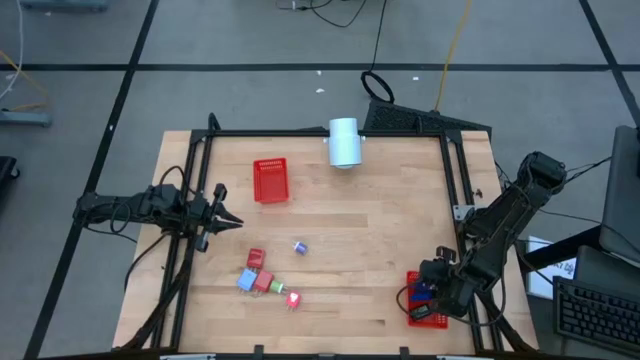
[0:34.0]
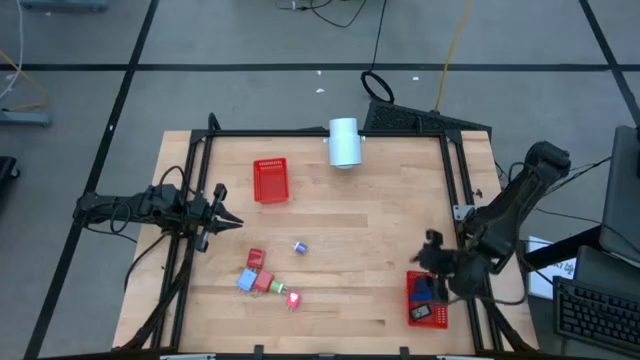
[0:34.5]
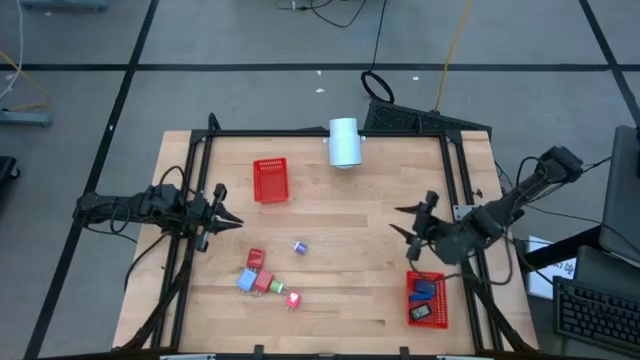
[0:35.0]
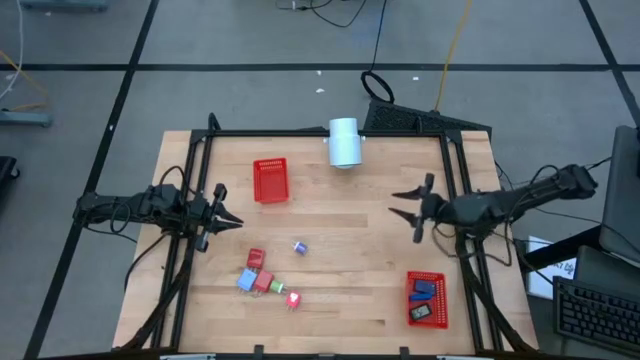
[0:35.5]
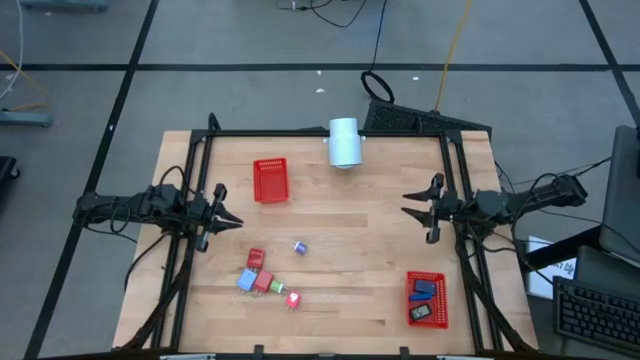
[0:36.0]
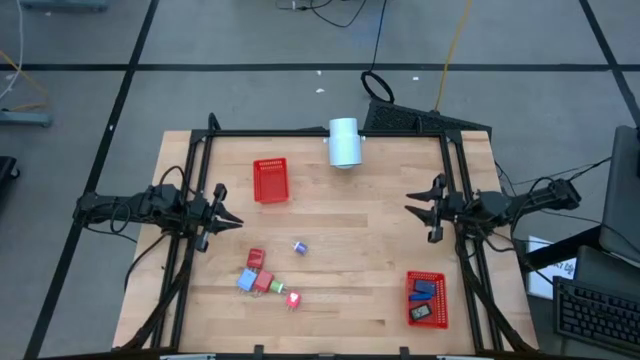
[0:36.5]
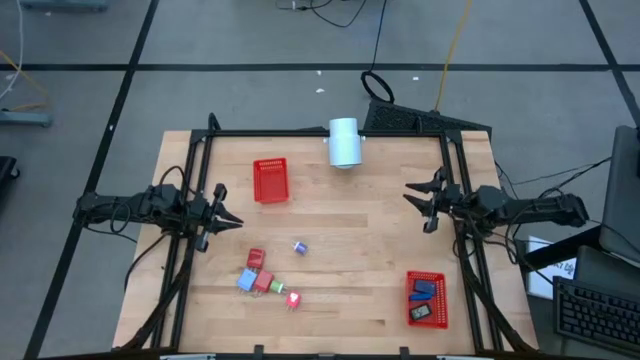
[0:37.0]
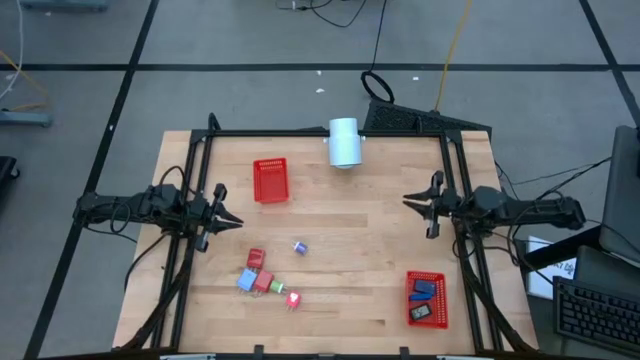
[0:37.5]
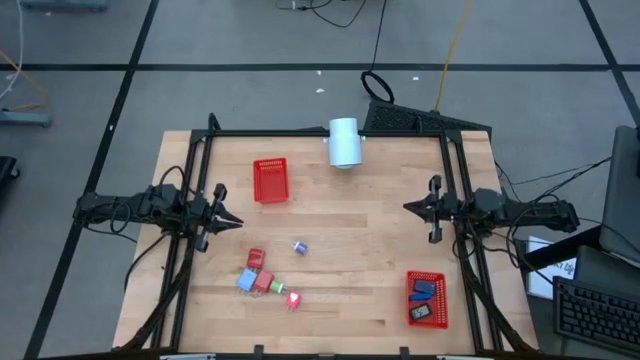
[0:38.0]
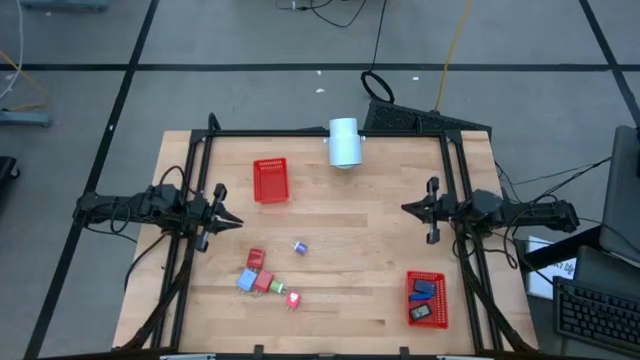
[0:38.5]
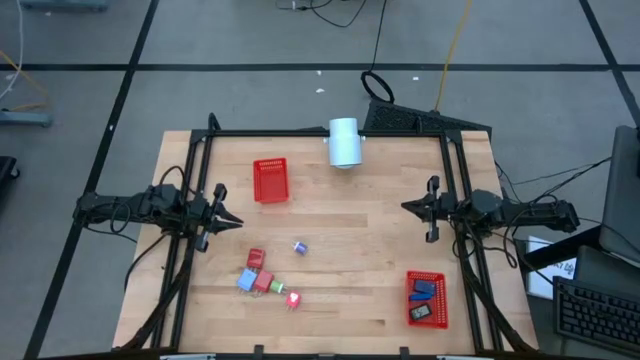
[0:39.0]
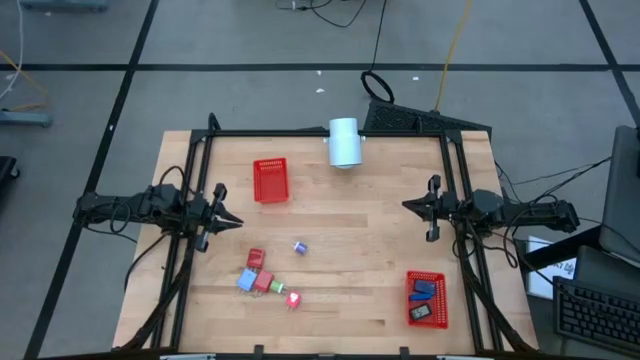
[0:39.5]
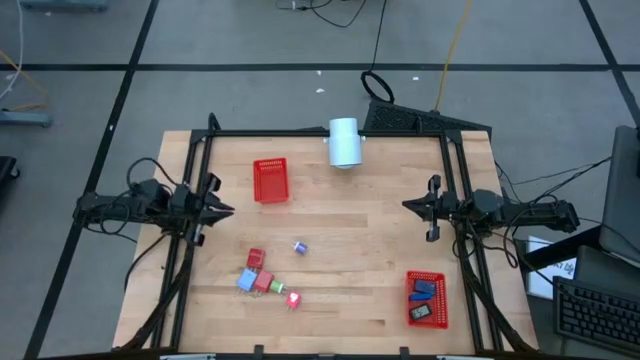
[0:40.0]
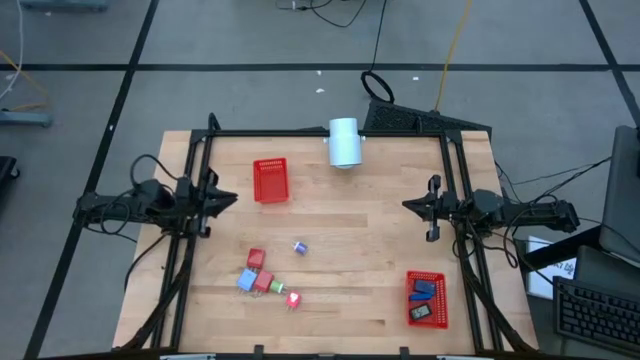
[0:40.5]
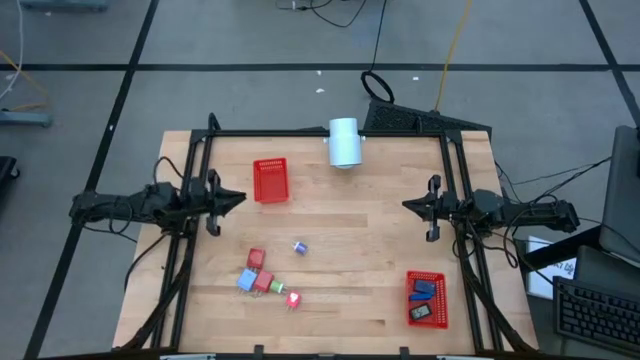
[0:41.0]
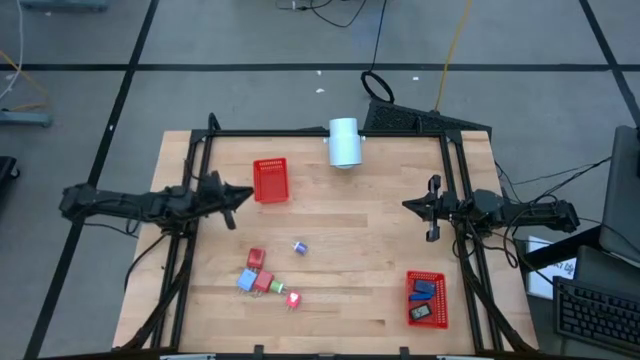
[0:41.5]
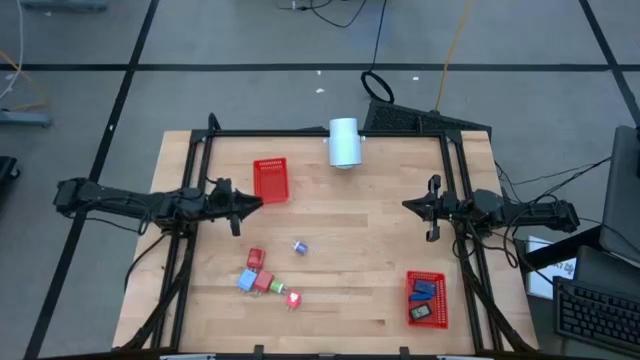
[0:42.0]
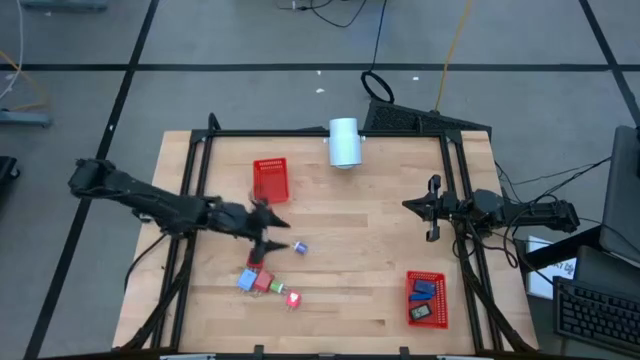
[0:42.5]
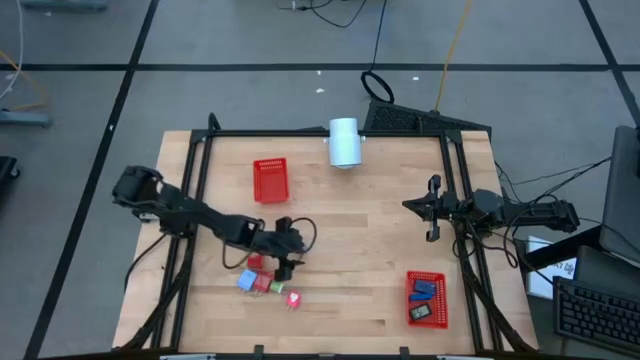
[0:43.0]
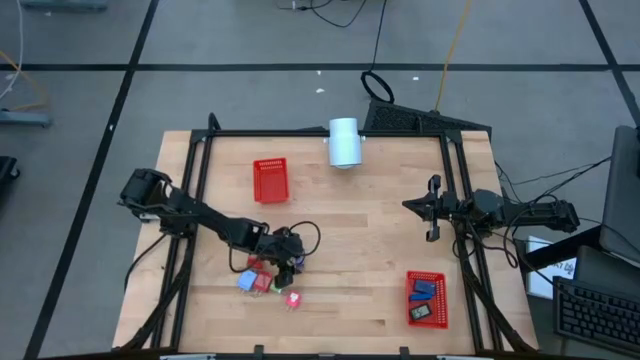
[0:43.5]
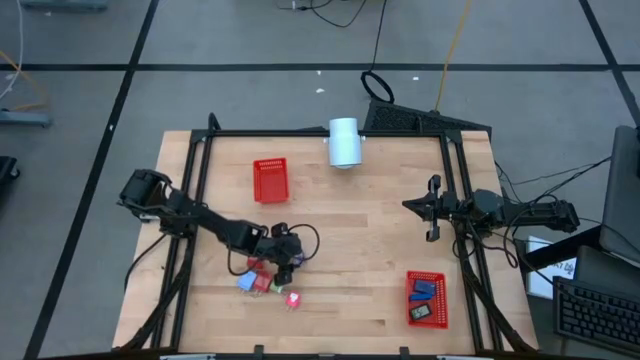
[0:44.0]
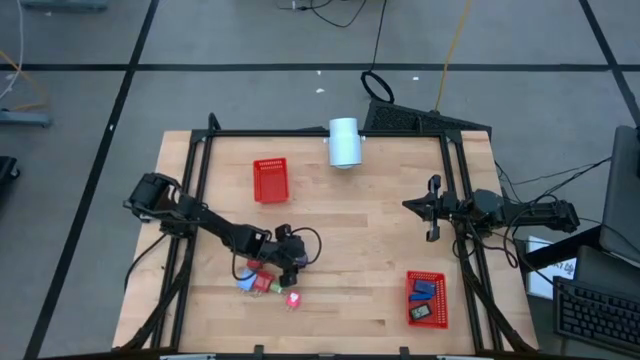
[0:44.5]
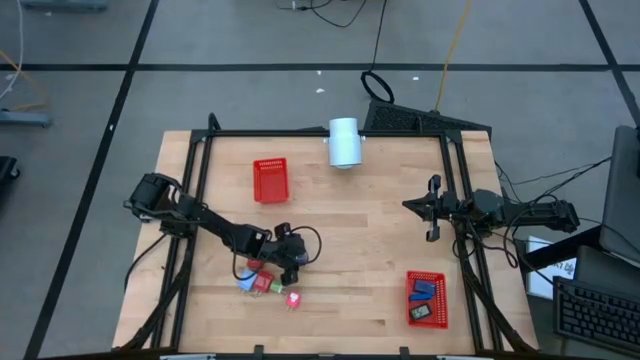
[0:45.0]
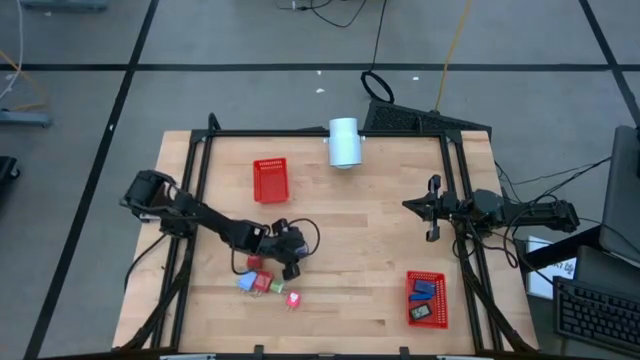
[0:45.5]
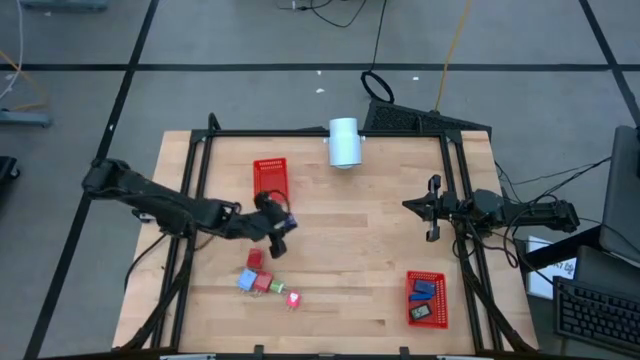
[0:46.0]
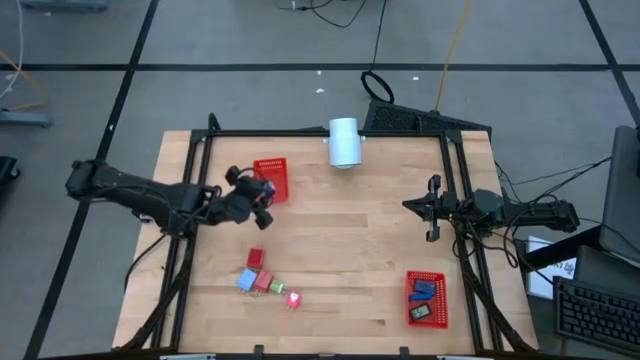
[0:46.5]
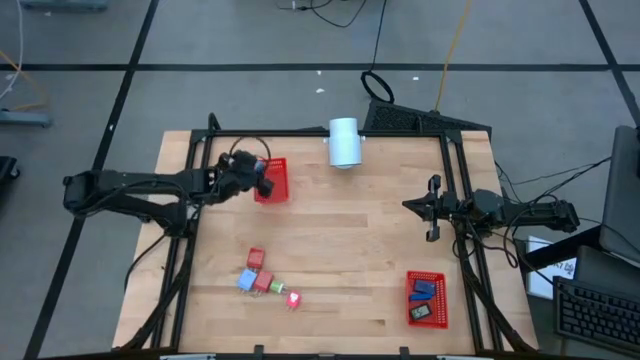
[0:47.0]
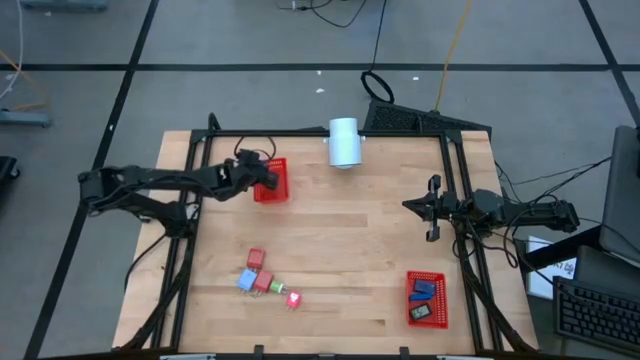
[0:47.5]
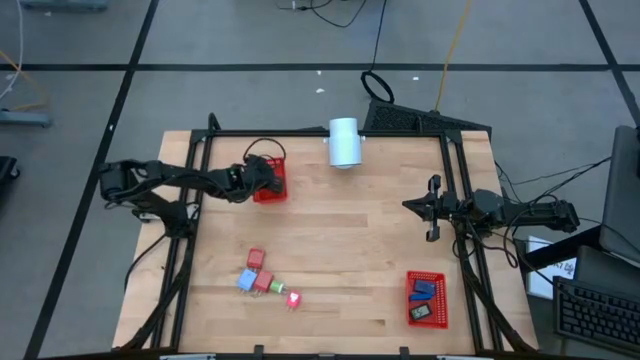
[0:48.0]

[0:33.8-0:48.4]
Task: Pick & Place Office items
Put the purple charger adapter into the top red bin

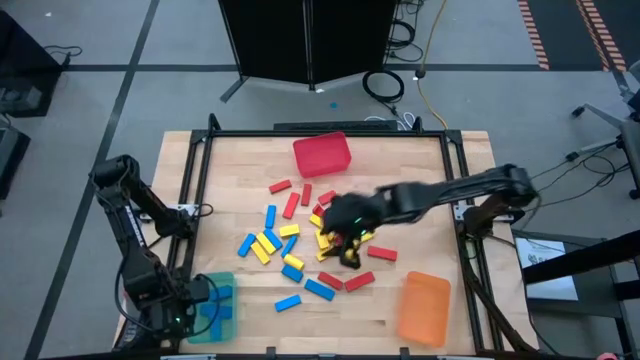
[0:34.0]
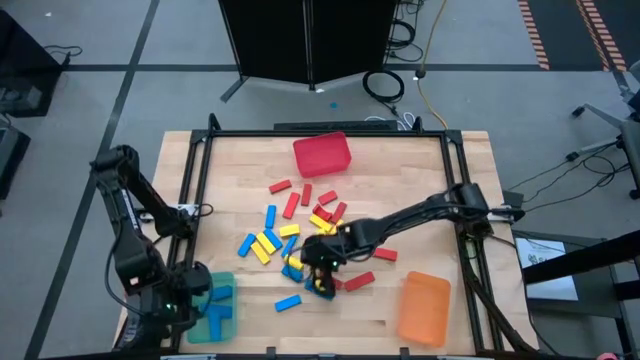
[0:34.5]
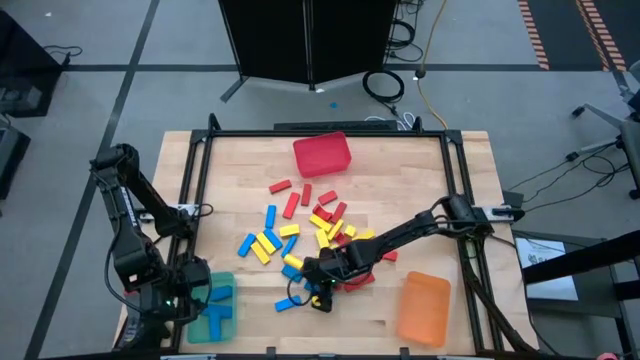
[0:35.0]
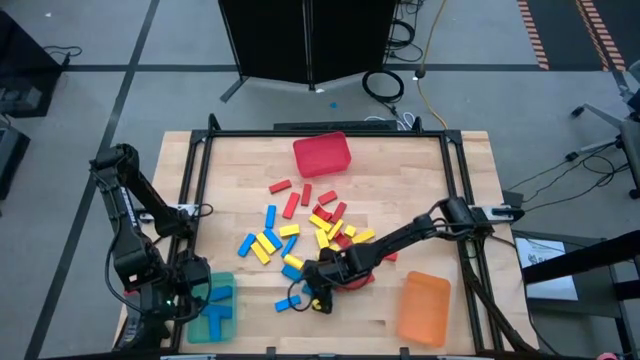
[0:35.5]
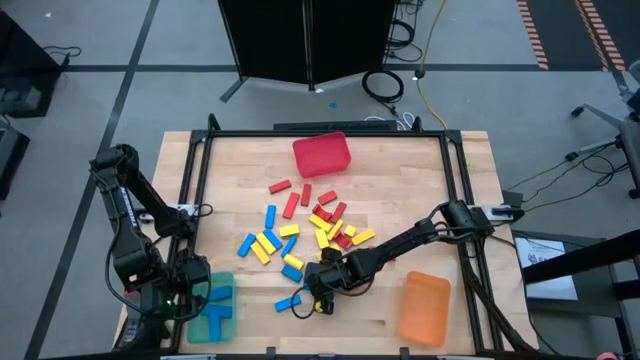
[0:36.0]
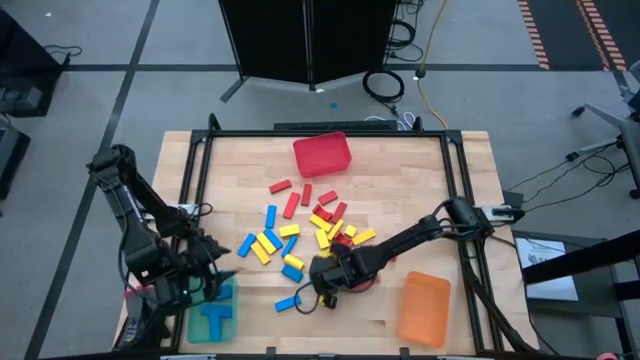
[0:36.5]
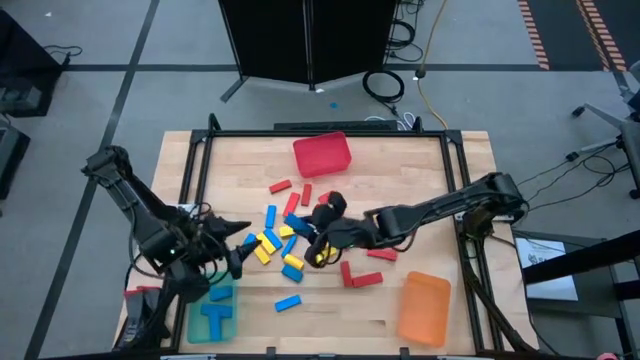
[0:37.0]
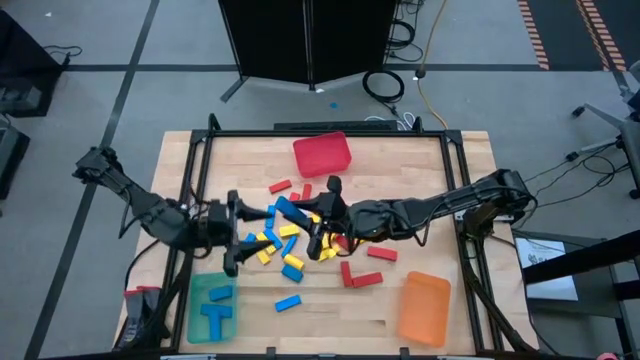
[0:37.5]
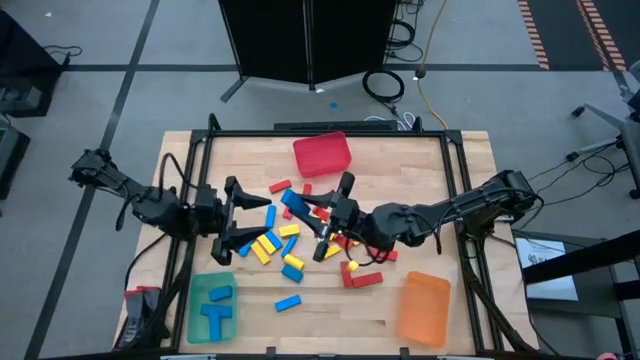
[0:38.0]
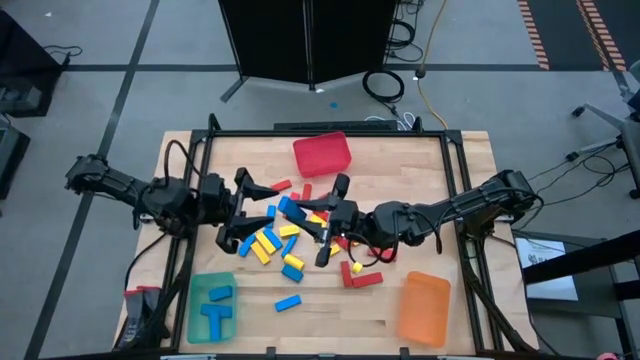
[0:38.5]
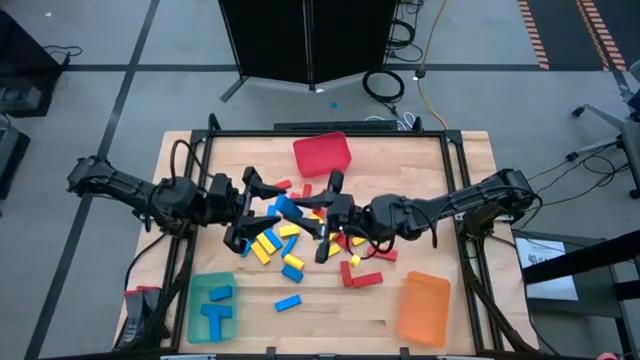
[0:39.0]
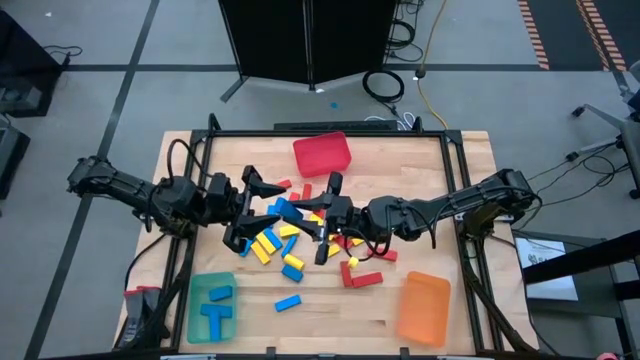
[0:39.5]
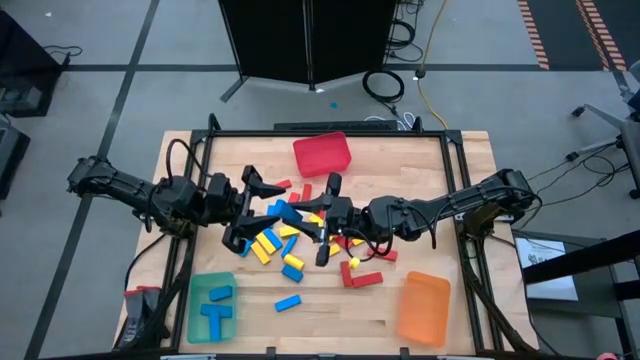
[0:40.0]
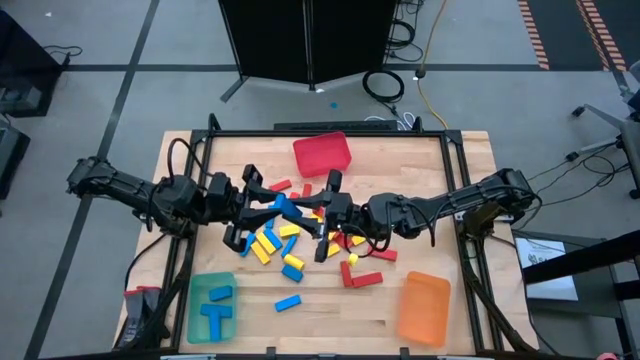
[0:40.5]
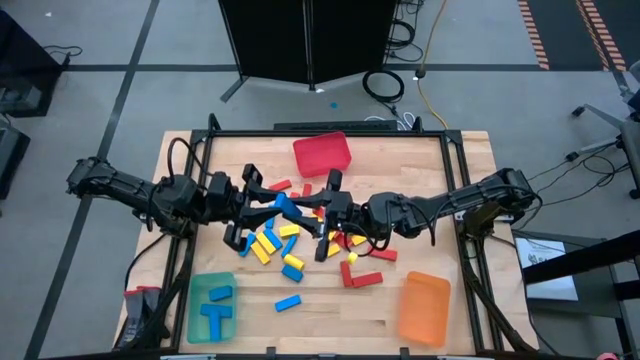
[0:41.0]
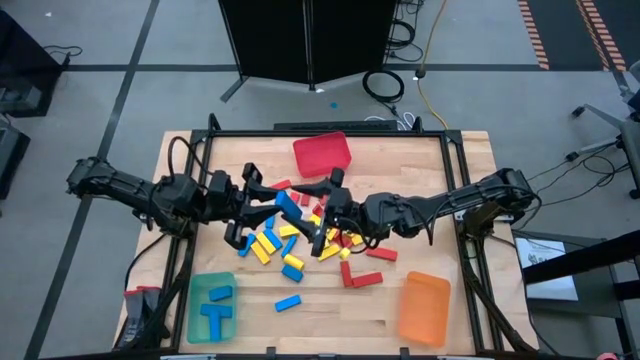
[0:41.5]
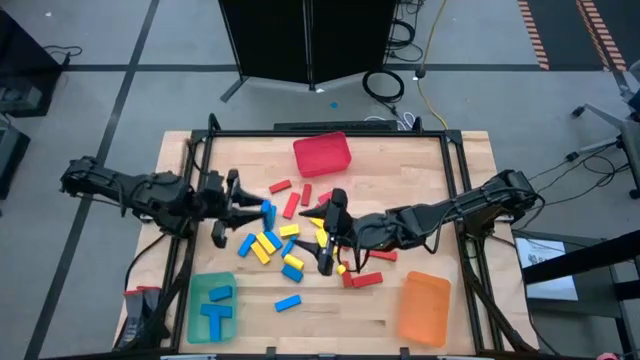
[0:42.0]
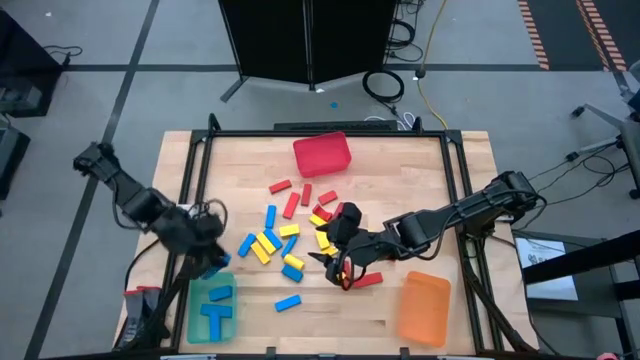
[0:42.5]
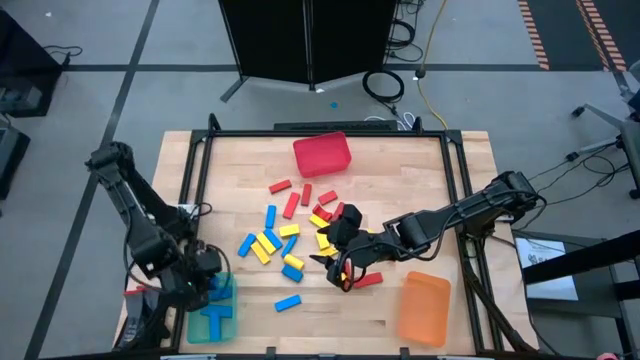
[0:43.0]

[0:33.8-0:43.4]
Task: Sort blocks
Put the blue block into the green bin
